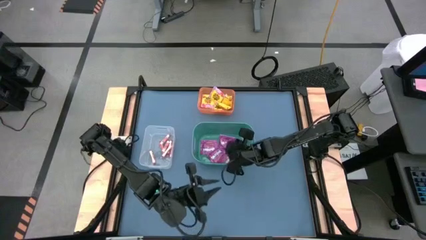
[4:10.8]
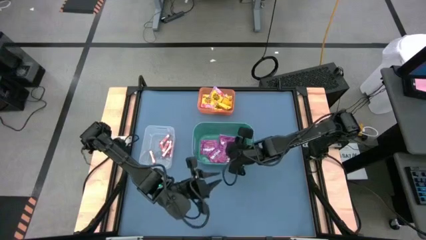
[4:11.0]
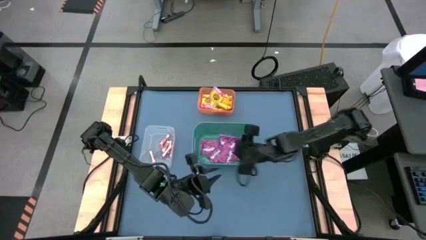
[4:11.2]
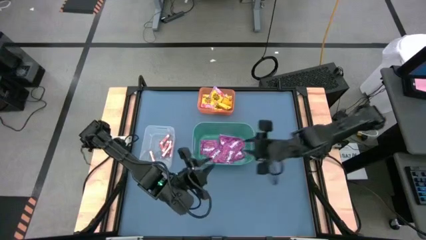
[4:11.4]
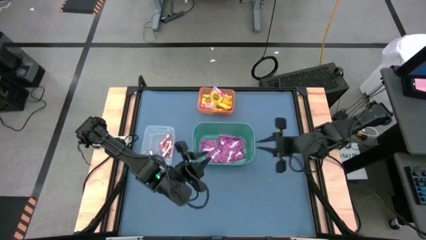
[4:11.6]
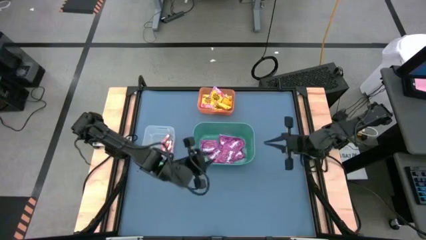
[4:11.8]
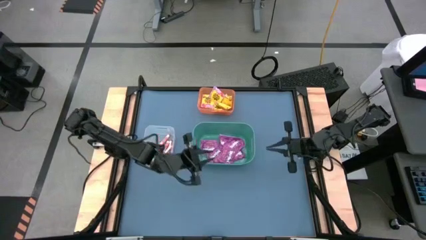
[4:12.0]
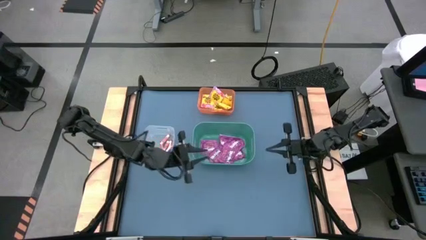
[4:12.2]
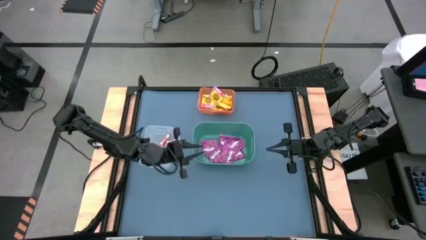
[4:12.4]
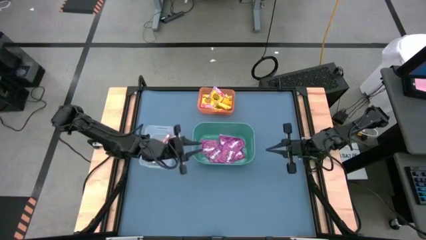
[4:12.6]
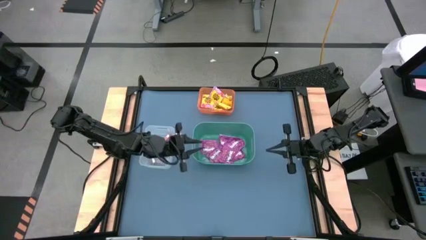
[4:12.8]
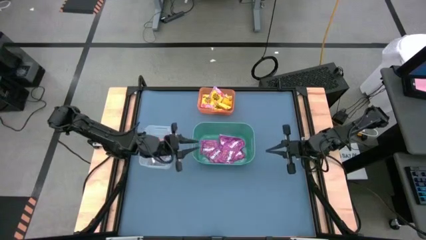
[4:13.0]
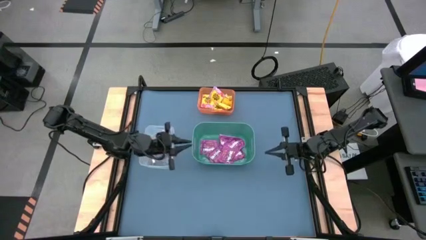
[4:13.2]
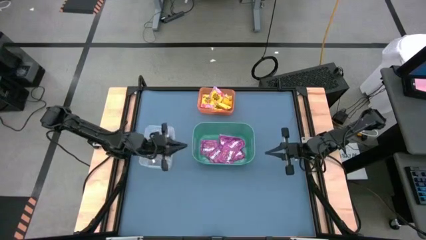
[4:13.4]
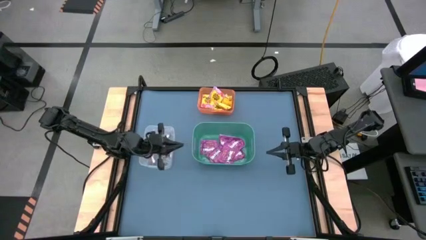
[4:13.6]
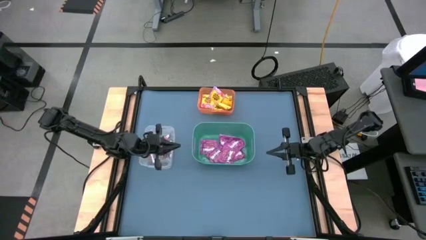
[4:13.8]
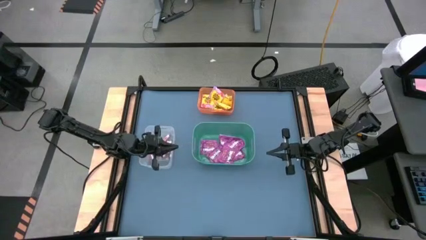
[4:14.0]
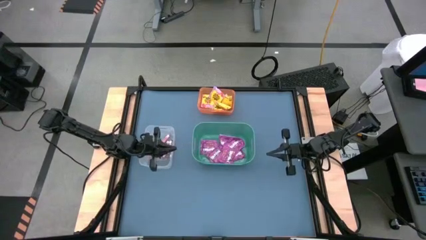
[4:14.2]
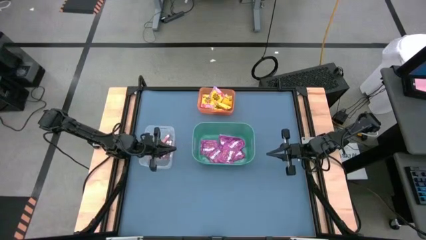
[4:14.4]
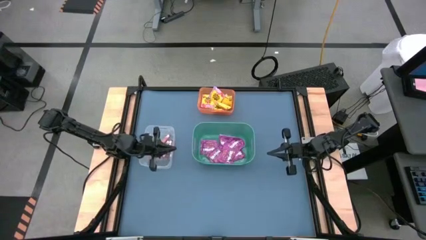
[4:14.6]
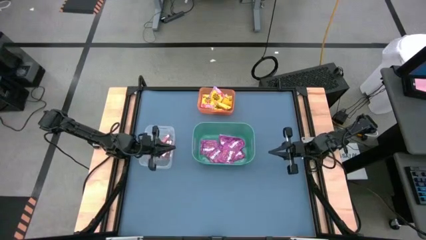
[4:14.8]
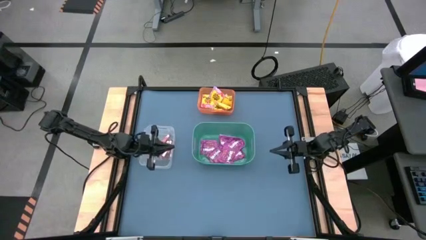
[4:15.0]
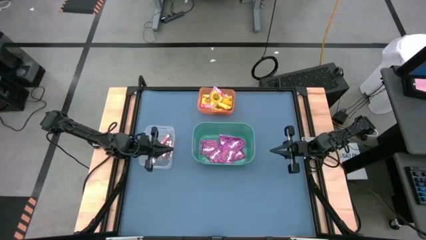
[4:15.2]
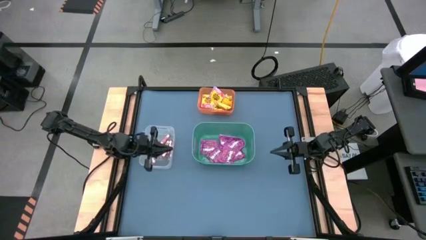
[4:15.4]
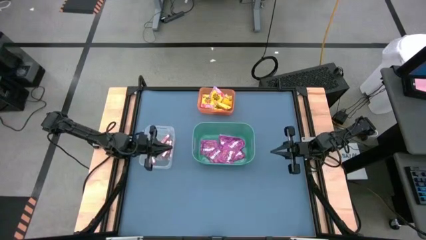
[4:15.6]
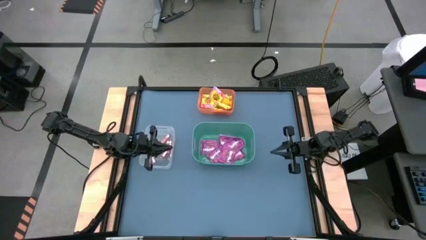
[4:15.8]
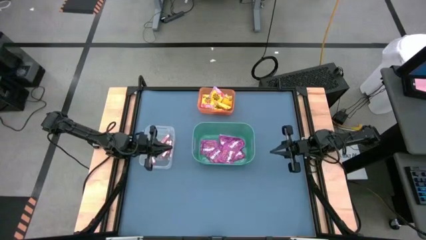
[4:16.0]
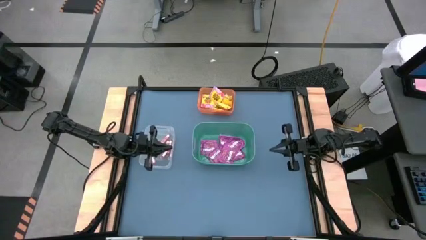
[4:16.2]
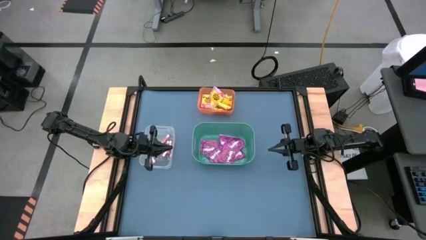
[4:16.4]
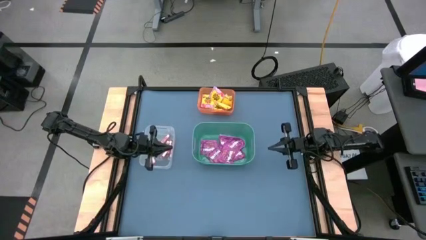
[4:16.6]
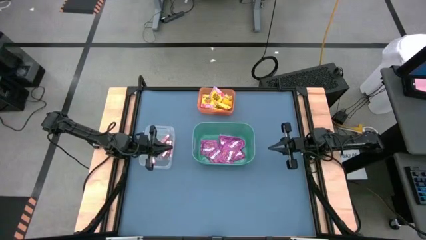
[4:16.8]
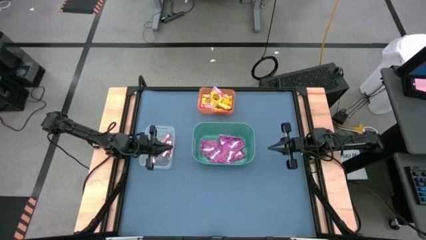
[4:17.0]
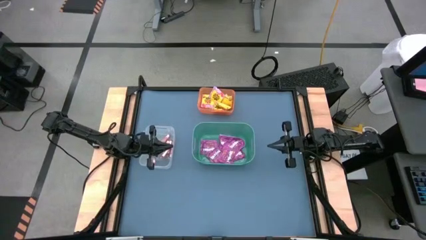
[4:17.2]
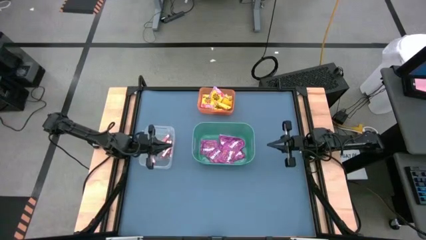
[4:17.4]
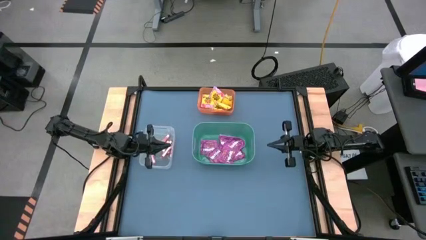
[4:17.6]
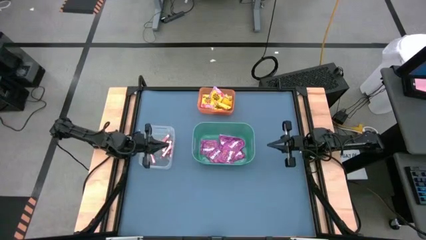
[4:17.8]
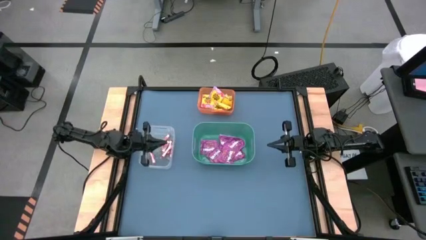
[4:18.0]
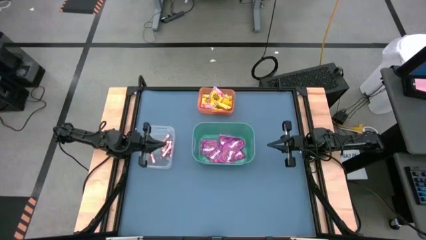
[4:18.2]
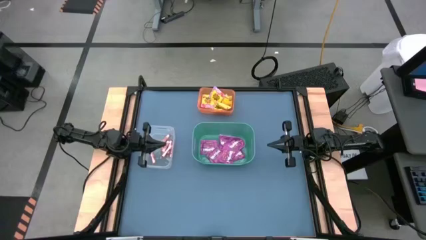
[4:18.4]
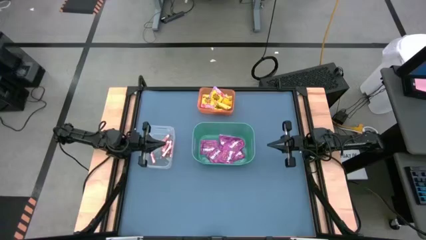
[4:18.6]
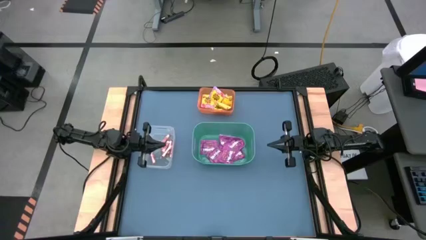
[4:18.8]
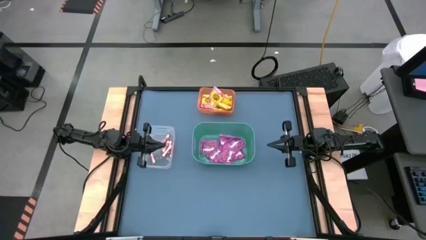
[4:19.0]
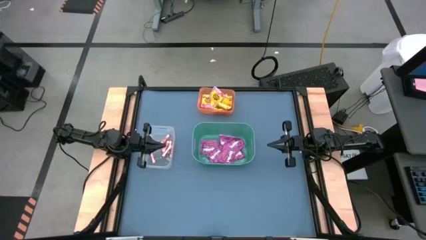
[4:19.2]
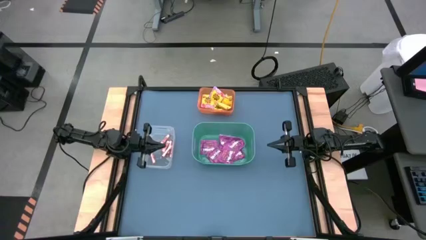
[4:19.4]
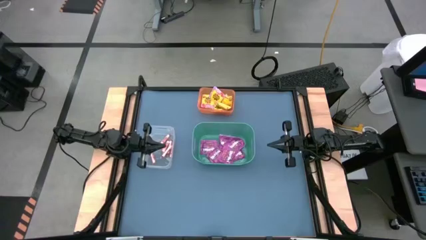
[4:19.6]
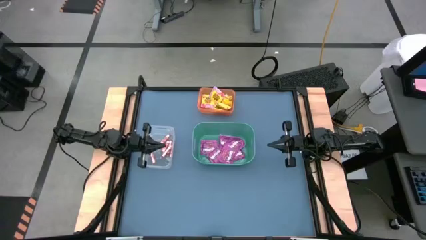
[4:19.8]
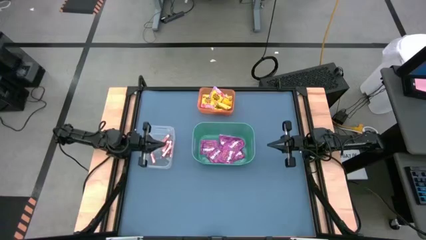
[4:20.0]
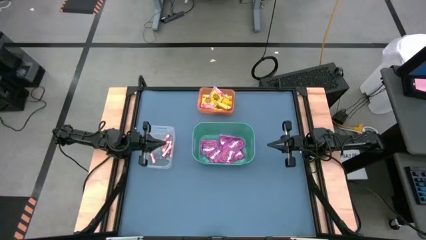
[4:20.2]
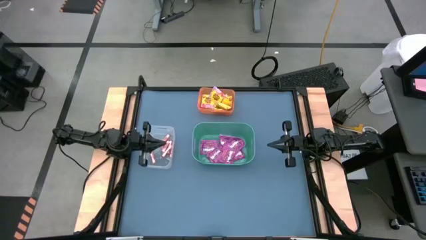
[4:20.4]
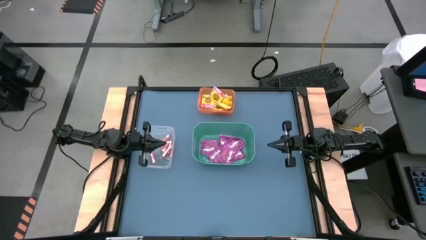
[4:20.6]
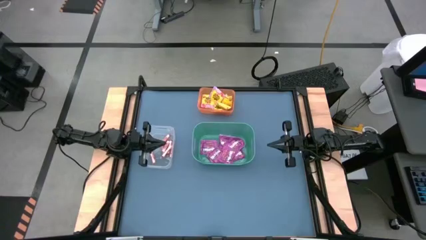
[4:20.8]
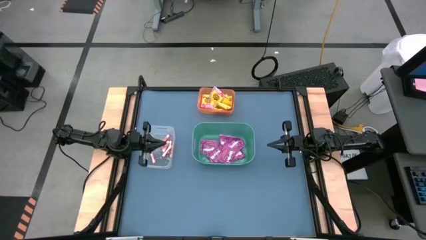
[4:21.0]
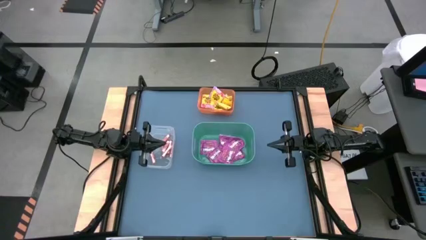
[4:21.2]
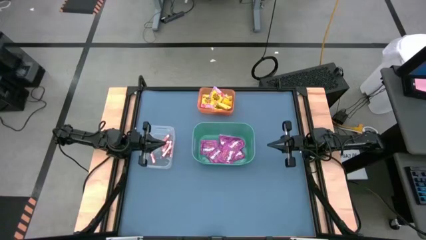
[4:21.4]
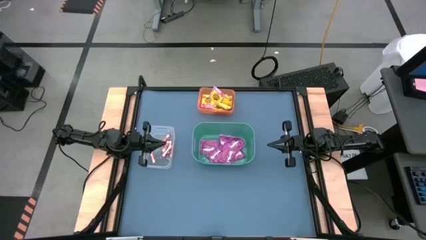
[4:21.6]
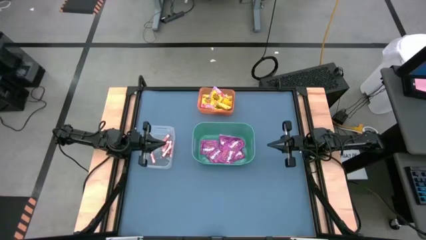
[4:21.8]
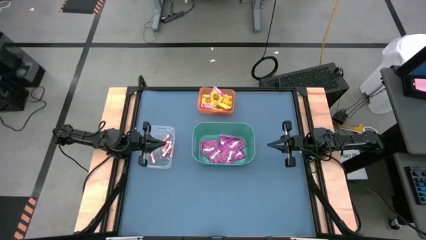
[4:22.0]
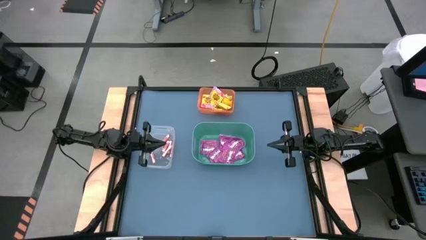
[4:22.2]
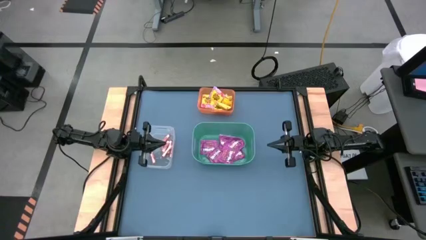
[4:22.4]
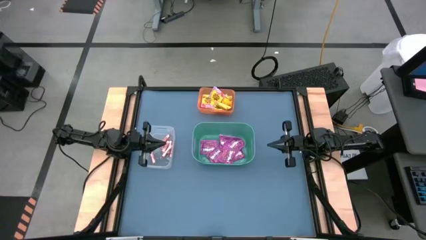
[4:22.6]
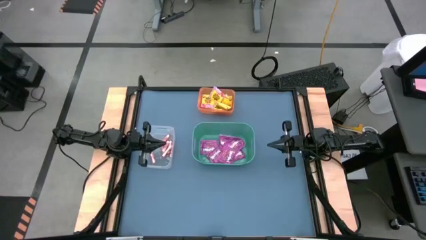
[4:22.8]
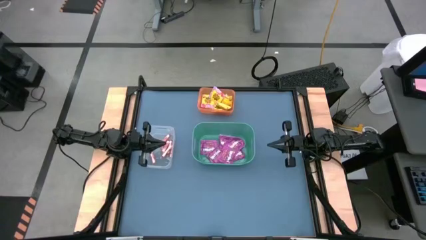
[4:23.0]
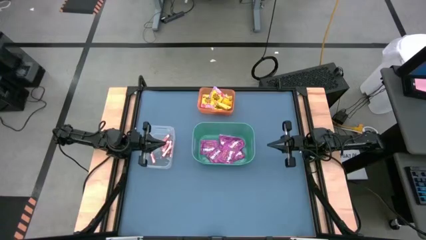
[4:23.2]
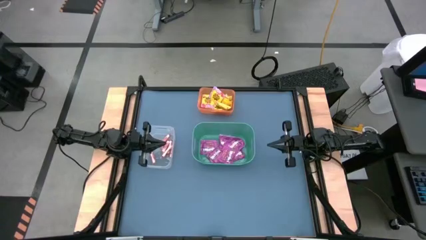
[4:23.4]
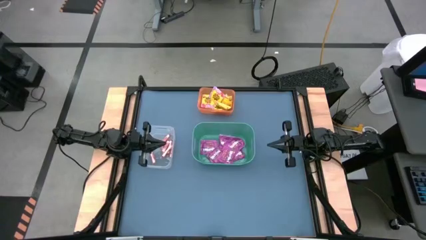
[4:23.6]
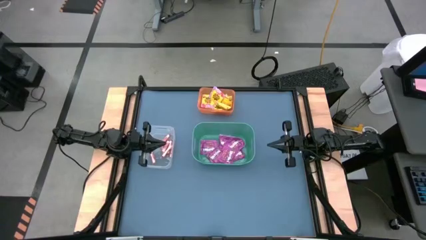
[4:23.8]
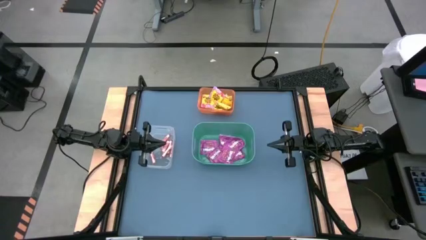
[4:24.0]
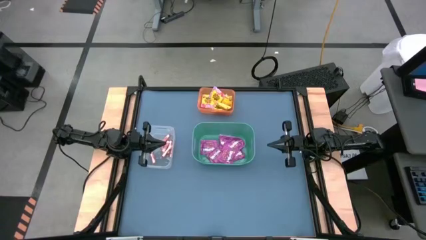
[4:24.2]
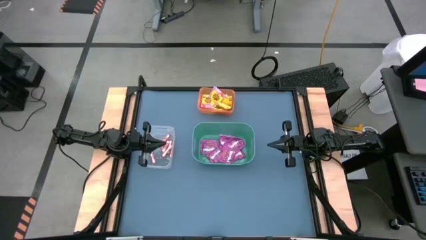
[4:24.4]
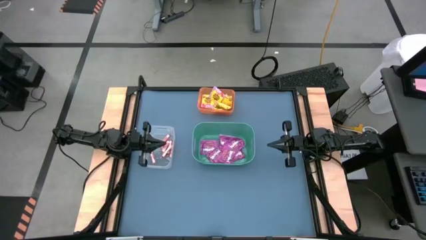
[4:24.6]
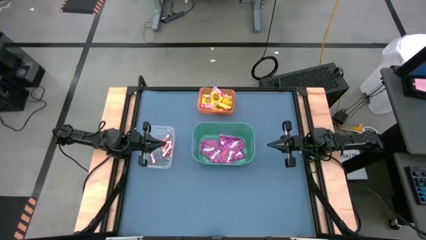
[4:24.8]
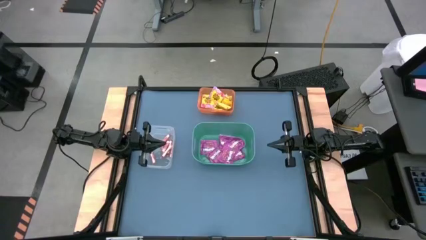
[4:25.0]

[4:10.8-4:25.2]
Task: Sort candy
Return to Home Position

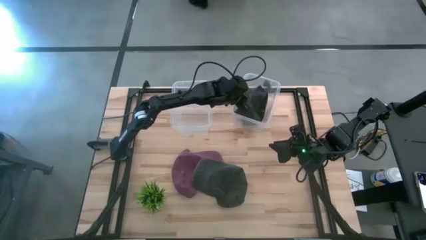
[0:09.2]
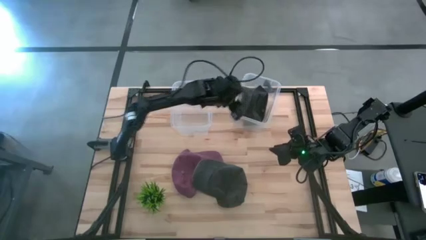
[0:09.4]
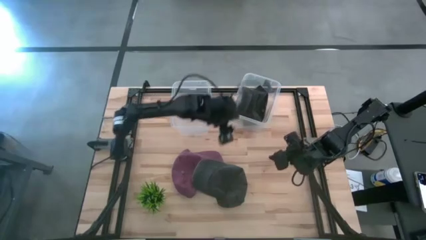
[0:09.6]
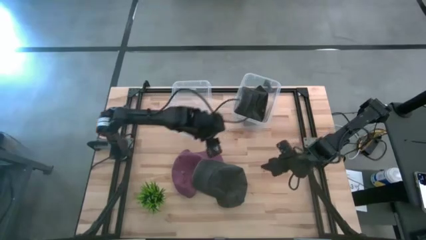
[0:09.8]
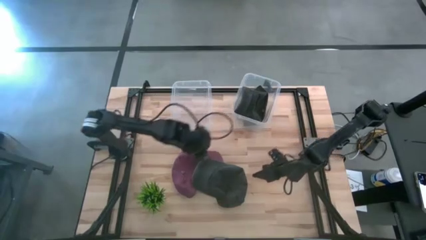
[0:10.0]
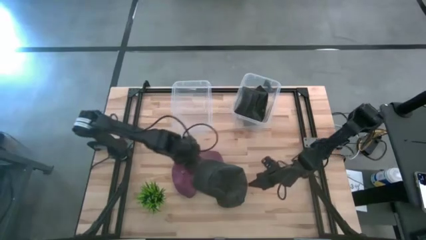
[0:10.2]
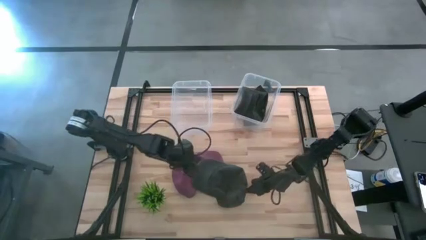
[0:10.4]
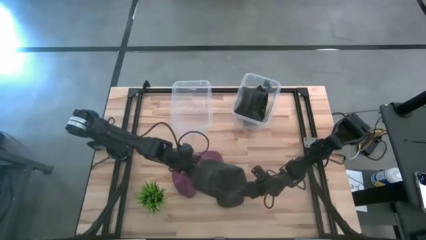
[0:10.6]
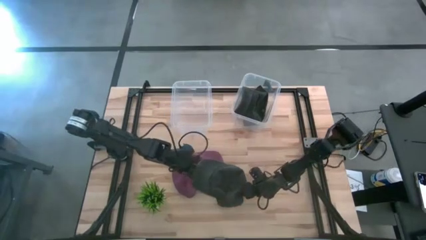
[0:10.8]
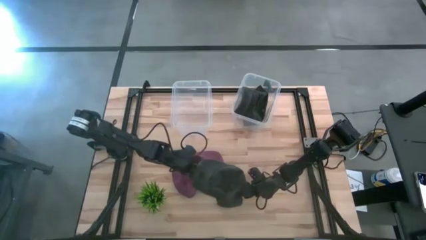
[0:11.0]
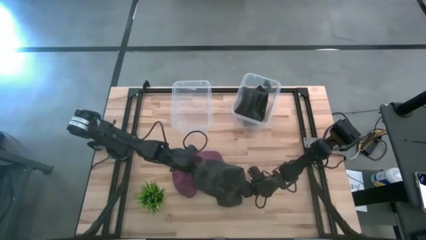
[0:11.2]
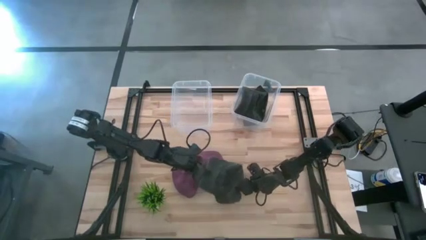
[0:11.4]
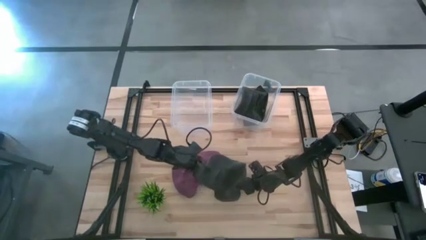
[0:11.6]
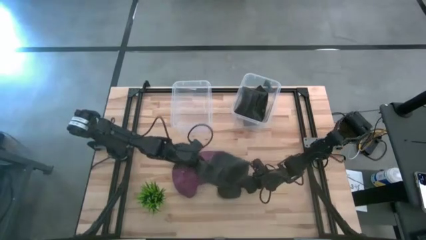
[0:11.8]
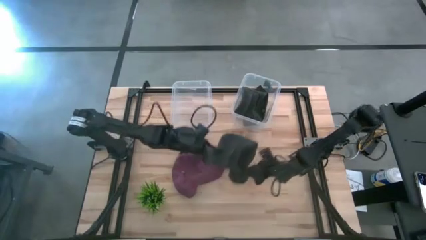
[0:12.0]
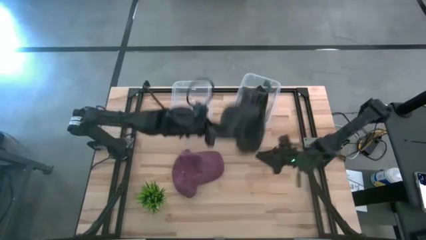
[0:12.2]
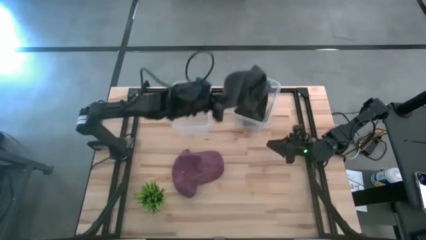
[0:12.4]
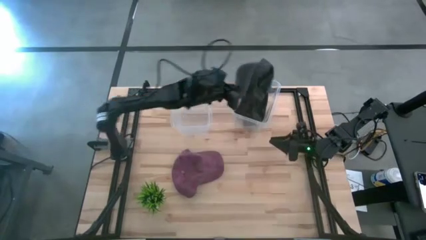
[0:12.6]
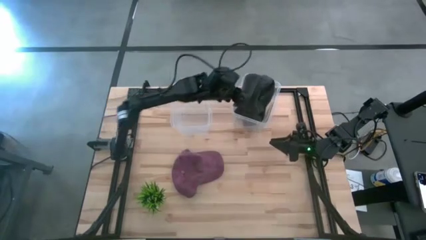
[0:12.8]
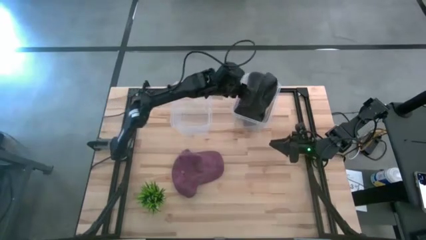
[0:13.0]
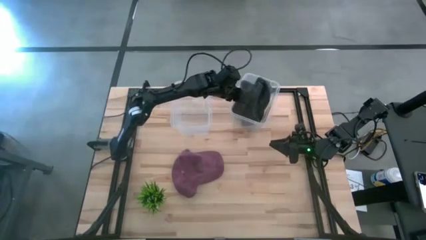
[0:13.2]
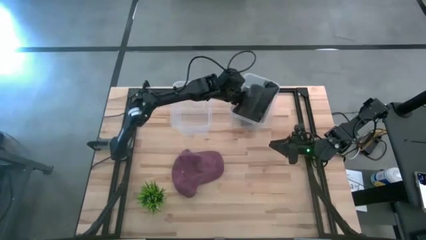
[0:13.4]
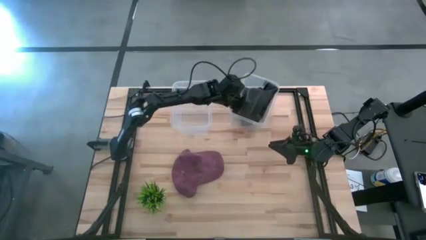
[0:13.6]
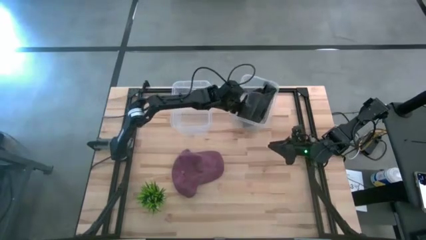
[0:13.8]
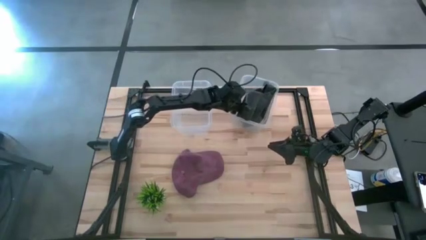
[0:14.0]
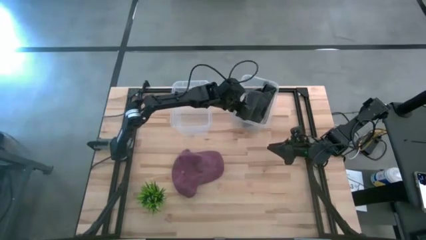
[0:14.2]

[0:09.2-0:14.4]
Task: Pick and place caps into container
Put the dark gray cap into the right transparent container
